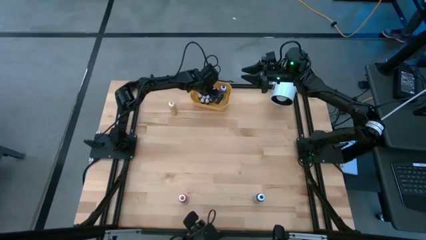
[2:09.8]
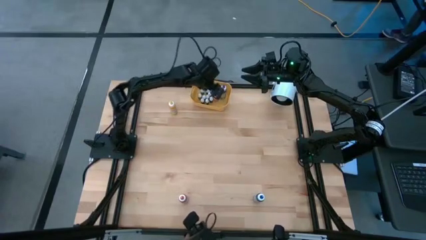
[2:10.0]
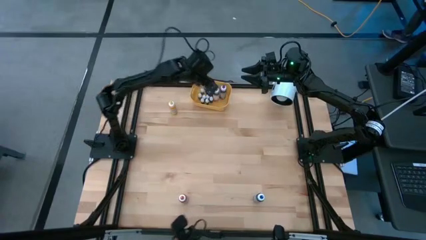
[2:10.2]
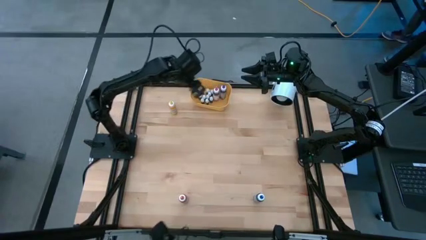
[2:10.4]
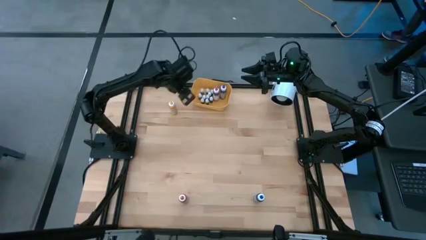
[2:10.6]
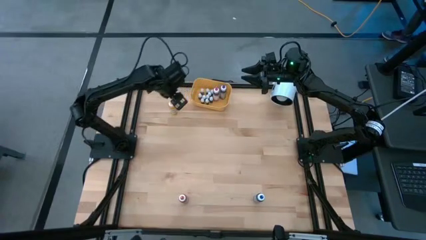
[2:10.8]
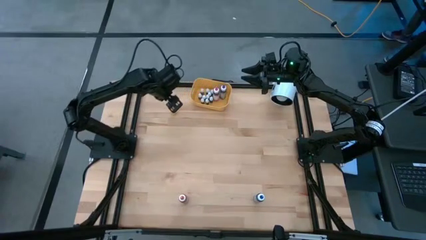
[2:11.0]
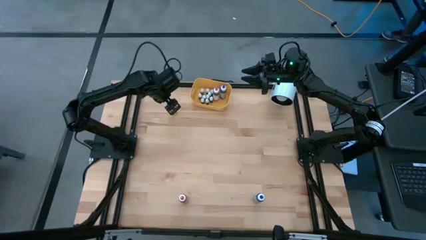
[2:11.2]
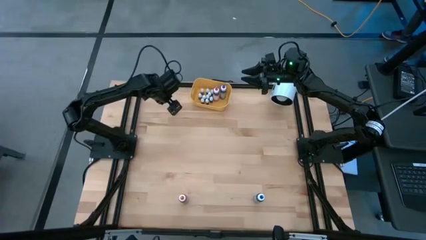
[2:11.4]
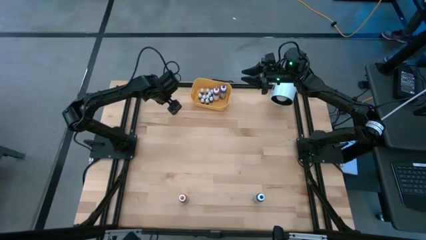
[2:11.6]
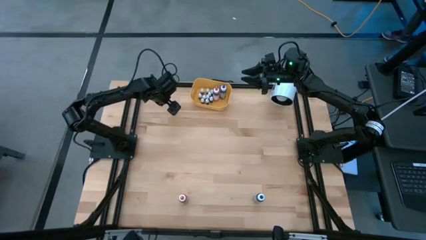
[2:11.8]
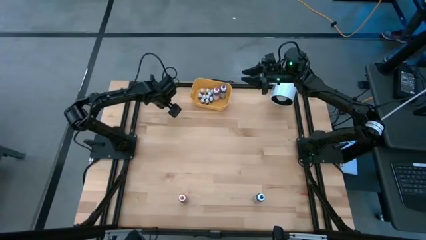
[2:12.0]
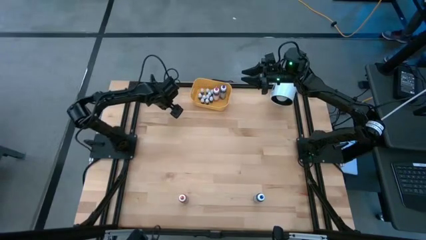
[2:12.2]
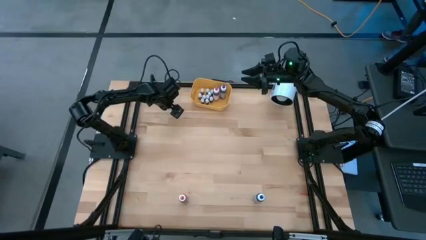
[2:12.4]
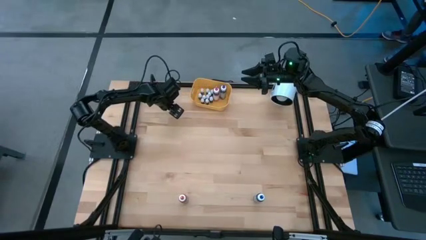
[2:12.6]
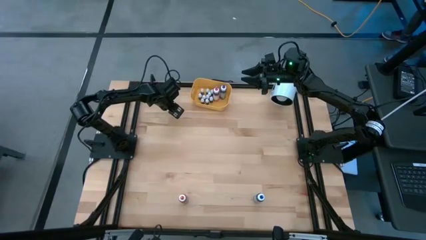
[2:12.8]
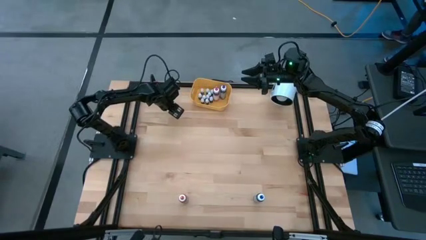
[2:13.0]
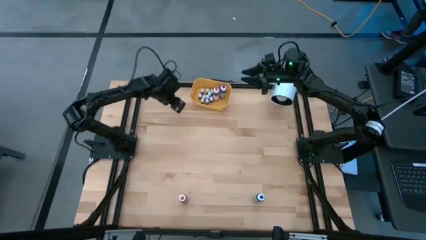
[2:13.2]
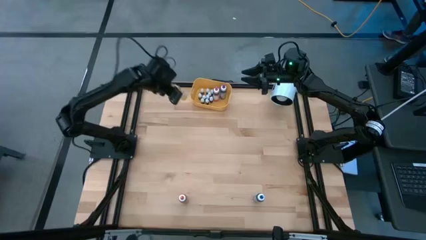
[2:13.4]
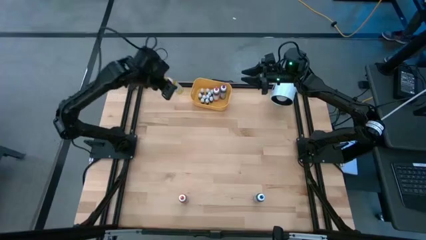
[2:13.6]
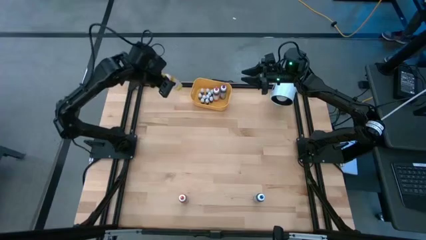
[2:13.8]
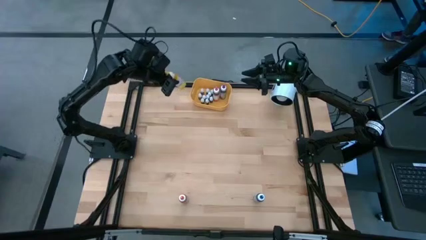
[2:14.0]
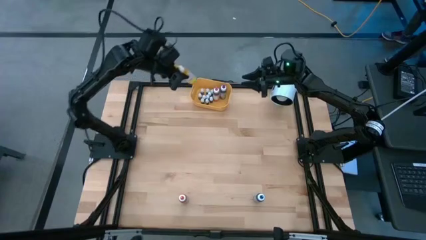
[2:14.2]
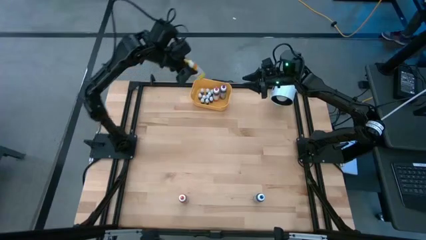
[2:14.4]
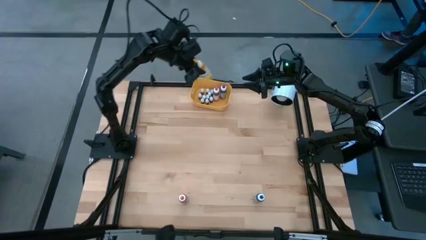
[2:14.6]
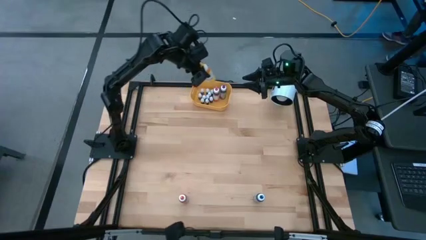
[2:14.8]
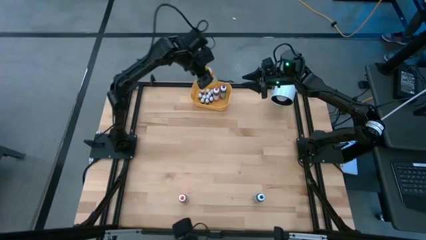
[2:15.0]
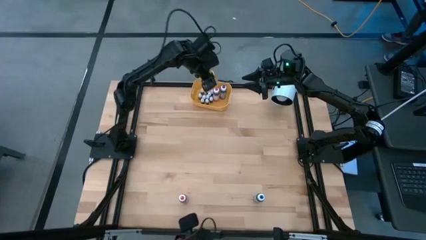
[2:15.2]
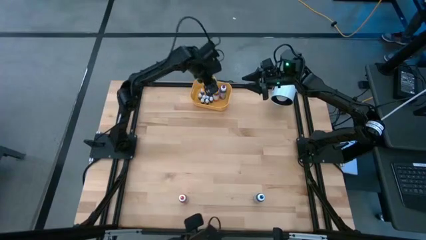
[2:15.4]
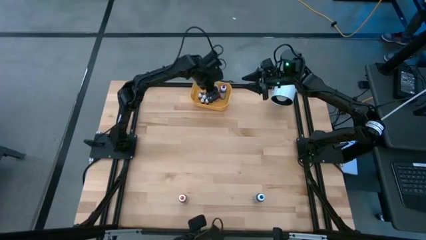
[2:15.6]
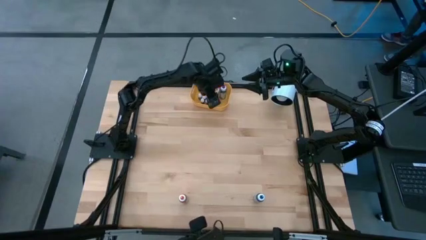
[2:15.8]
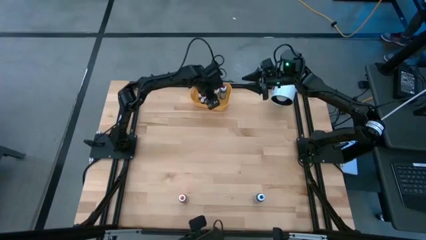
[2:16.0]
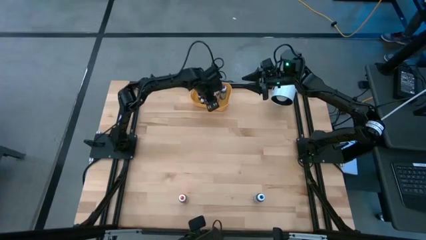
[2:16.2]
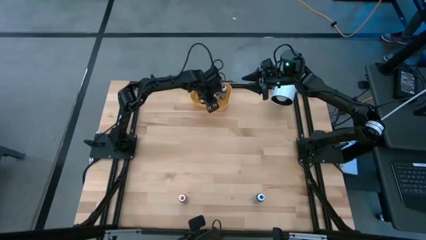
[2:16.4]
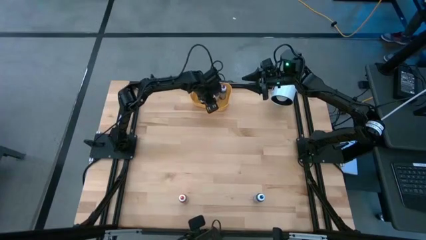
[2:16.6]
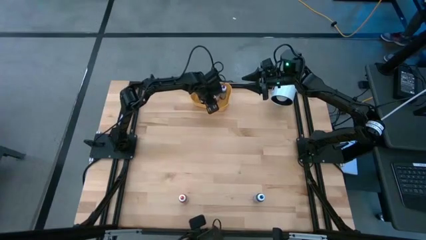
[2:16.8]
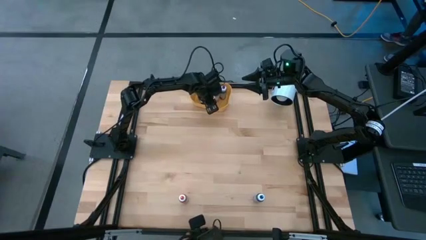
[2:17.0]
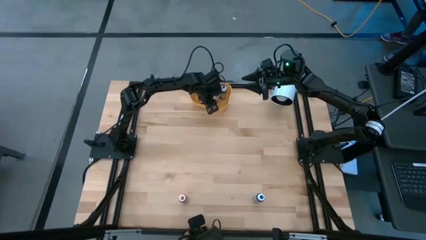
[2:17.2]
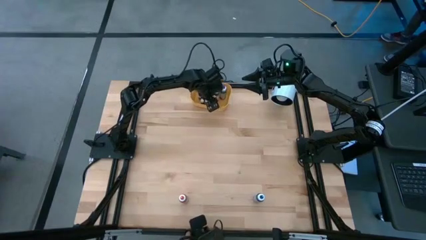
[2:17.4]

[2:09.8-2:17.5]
Task: Pick & Place food coloring
Put the large yellow food coloring bottle into the bin

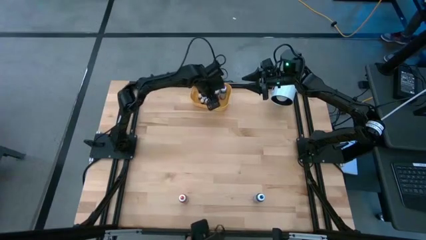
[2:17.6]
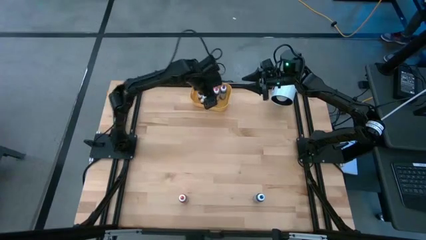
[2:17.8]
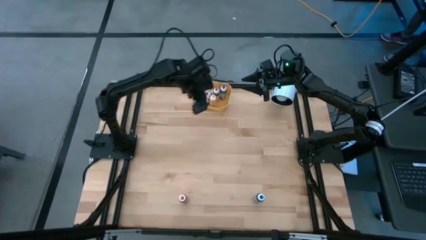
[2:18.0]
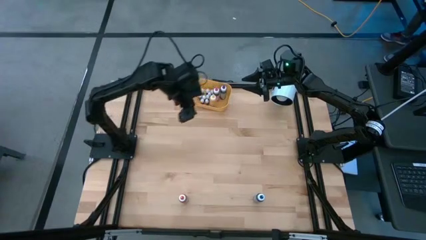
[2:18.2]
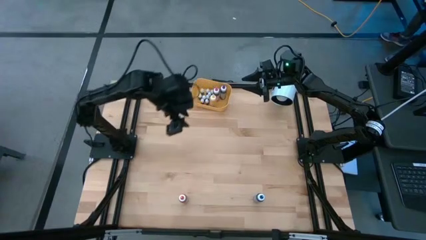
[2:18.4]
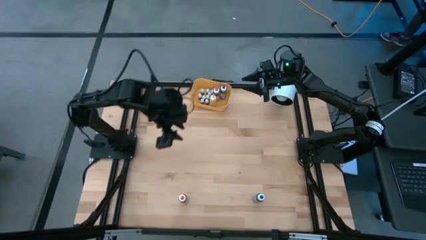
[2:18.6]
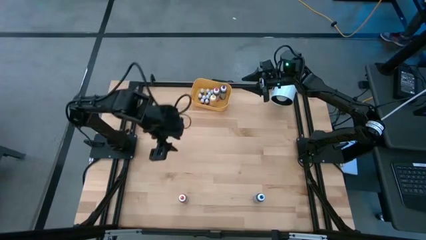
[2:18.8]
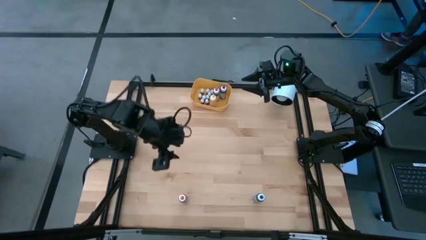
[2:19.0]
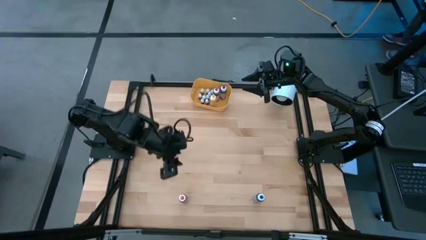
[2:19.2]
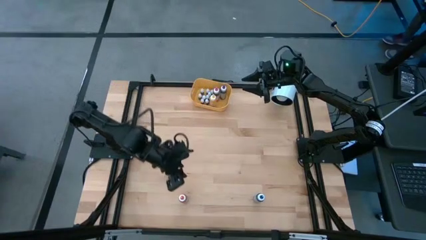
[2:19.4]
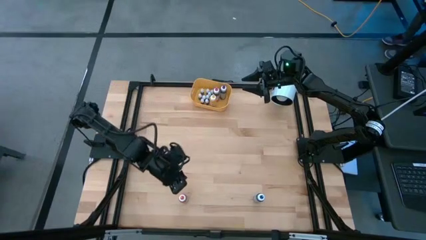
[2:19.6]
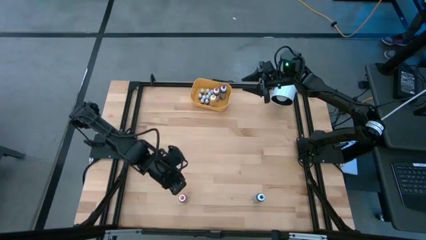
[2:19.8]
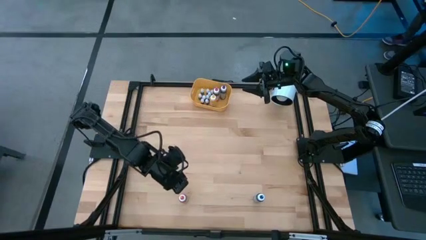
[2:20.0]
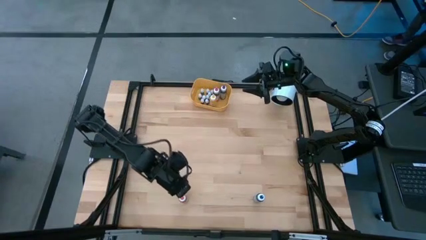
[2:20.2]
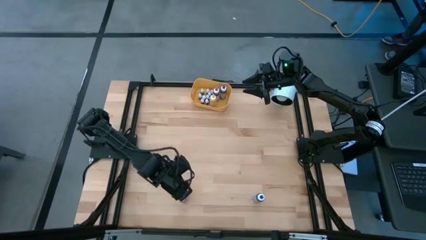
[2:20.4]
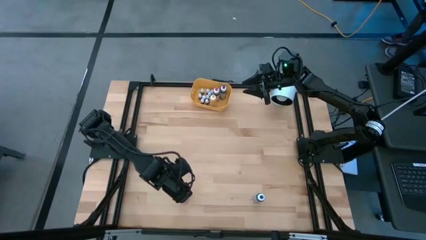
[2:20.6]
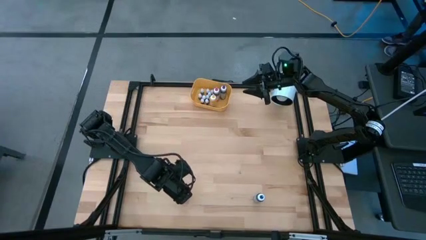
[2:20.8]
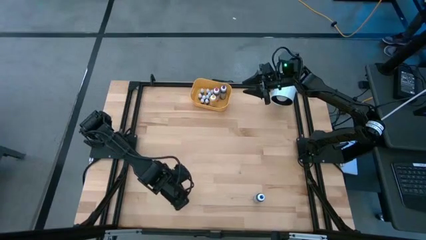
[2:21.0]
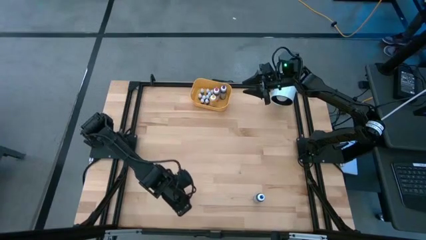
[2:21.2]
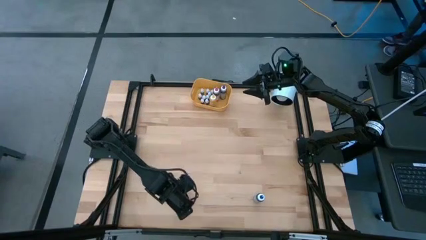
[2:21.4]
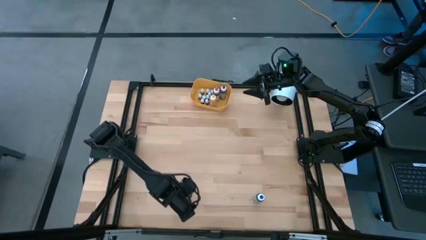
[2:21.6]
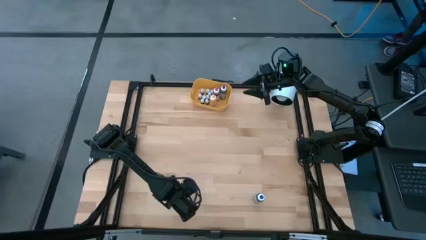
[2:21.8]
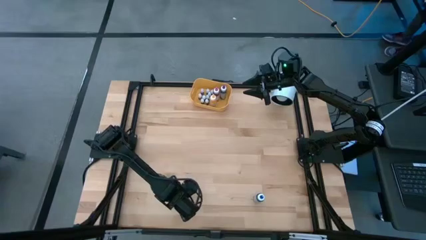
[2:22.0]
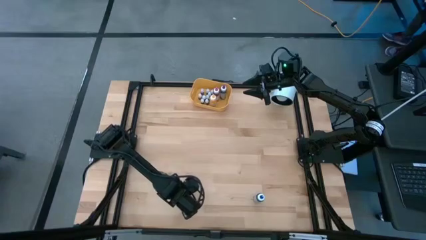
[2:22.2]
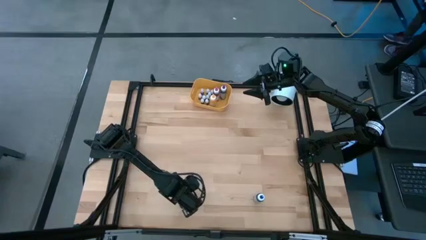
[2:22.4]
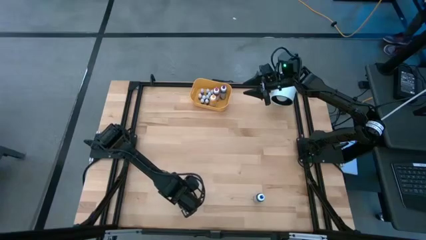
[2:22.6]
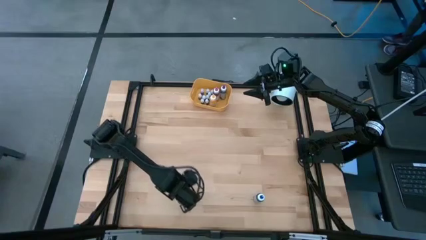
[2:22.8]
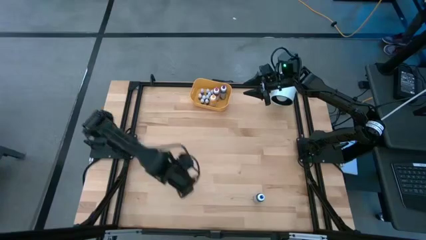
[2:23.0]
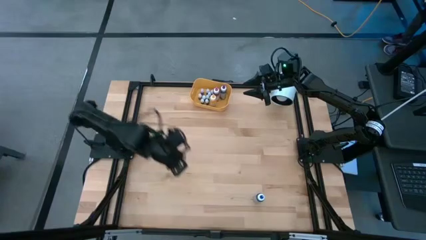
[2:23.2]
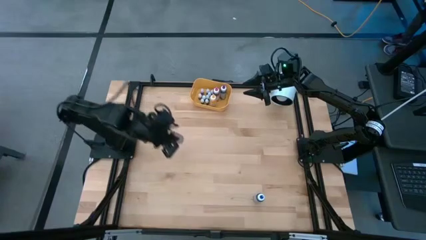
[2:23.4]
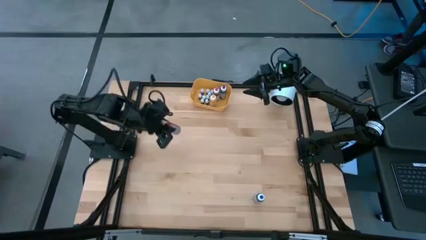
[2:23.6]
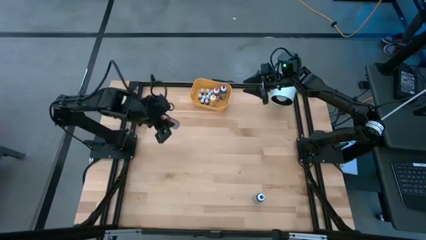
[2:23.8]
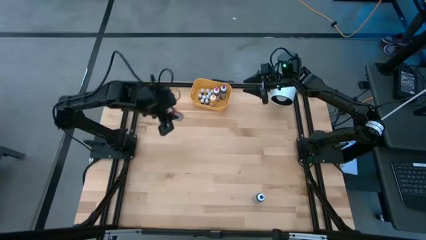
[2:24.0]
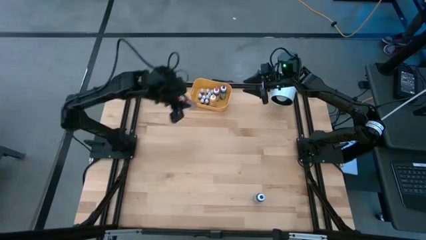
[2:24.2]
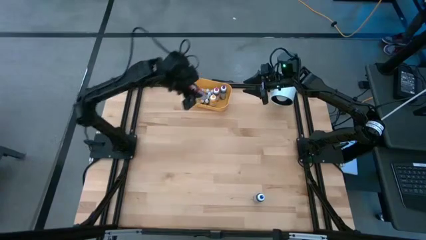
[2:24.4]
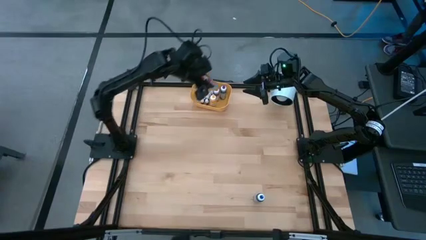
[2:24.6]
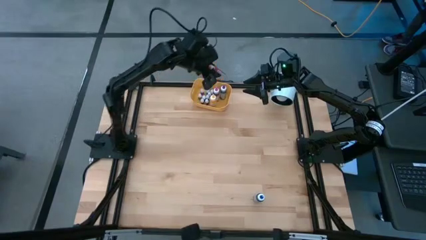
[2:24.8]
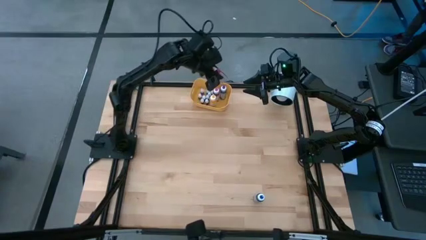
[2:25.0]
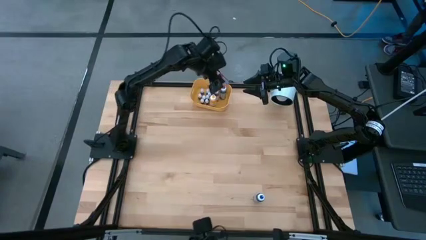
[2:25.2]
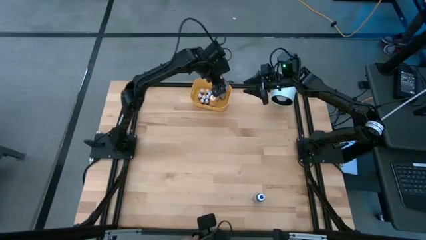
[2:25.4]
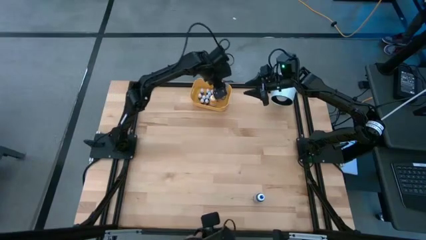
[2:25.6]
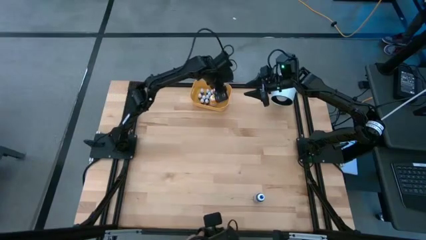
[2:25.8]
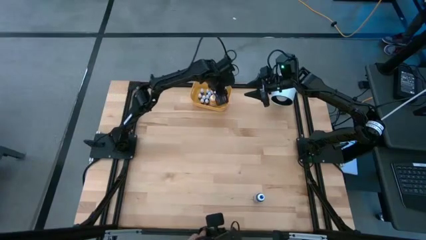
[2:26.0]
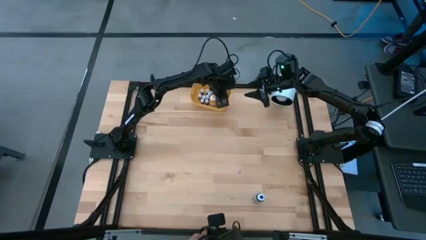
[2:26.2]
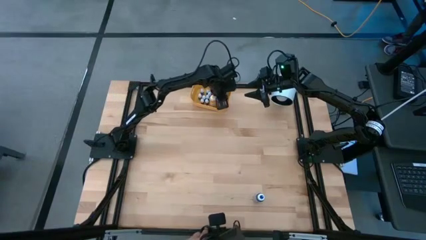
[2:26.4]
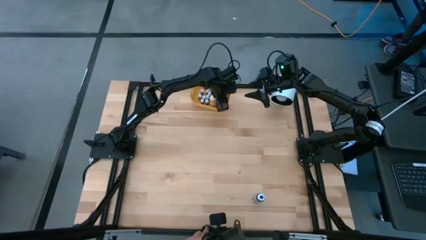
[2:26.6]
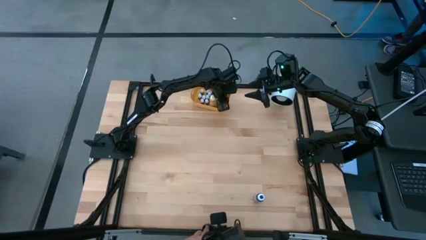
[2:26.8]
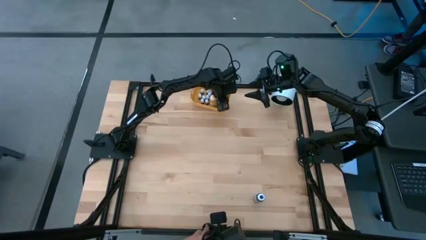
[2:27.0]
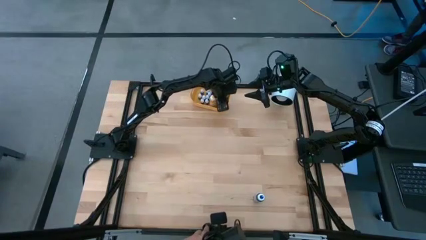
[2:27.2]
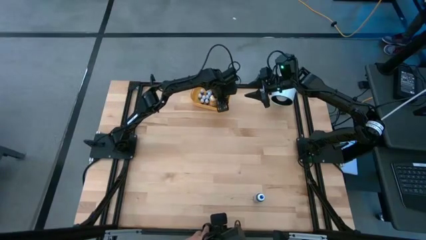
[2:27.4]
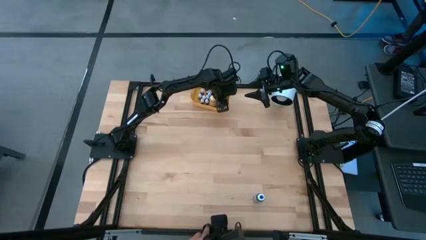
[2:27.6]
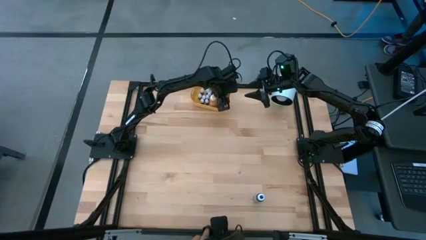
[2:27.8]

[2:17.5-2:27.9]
Put the large orange food coloring bottle into the bin
